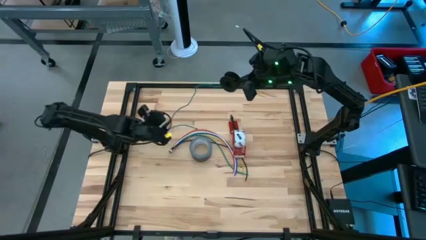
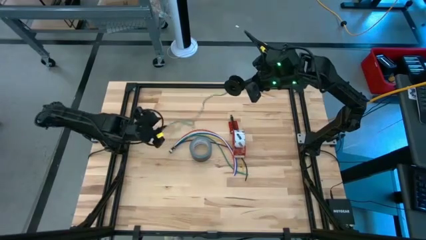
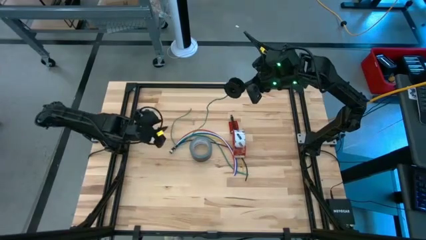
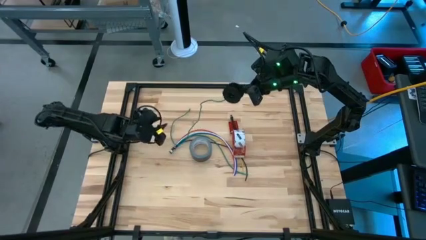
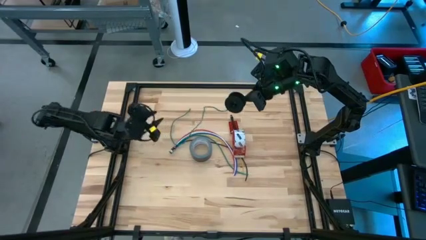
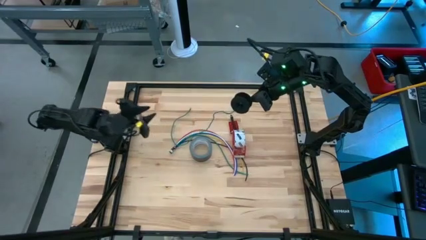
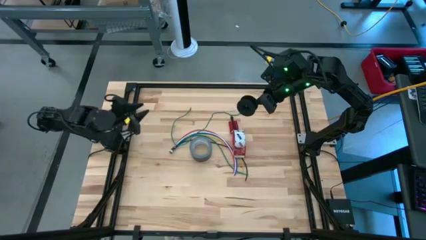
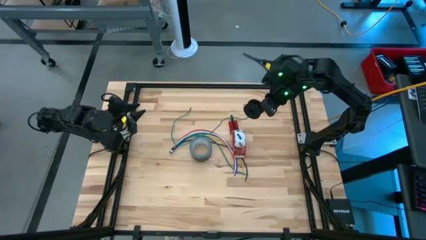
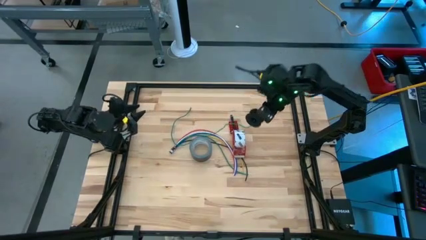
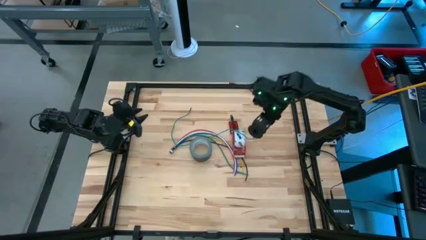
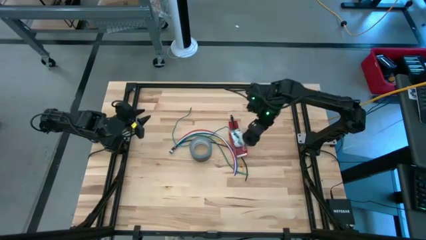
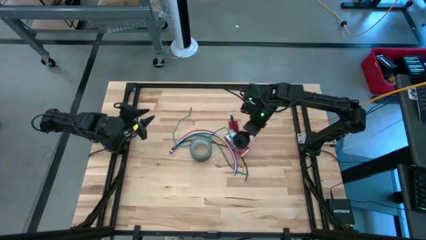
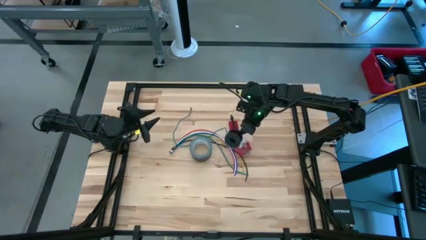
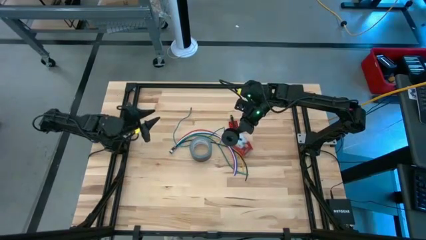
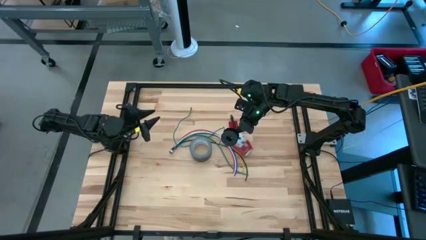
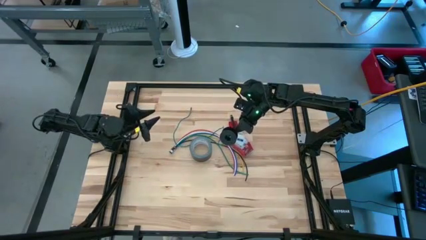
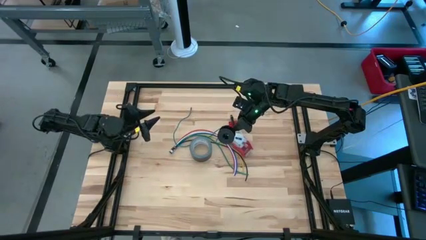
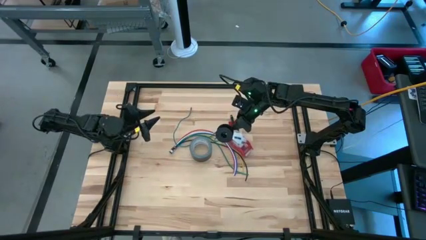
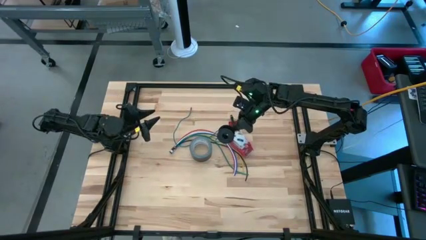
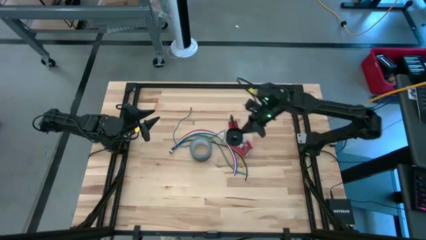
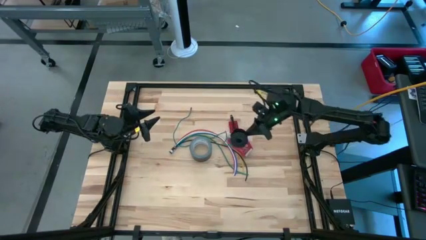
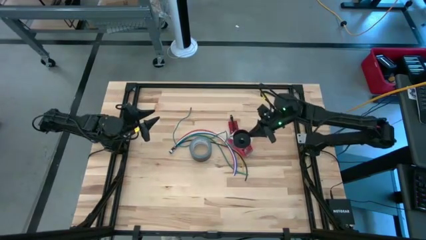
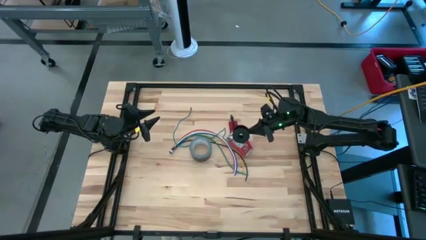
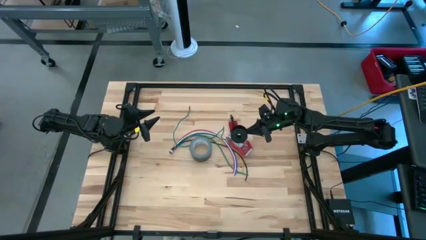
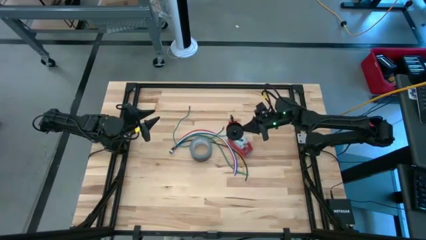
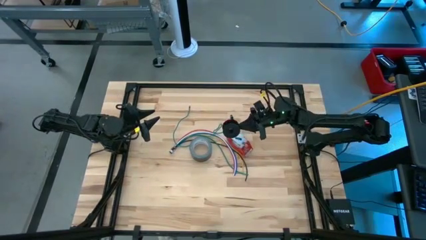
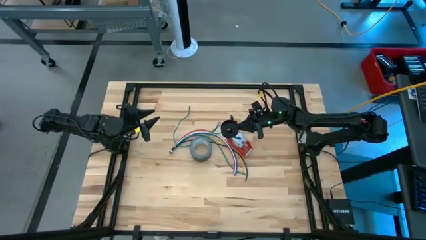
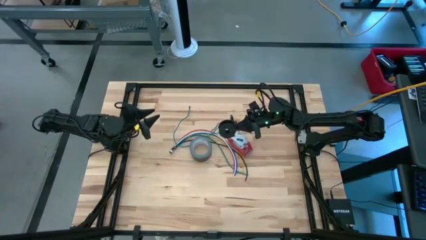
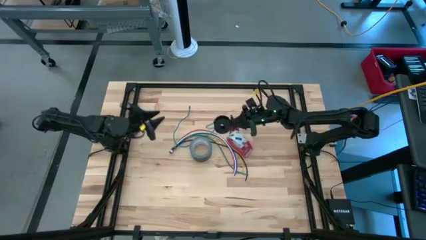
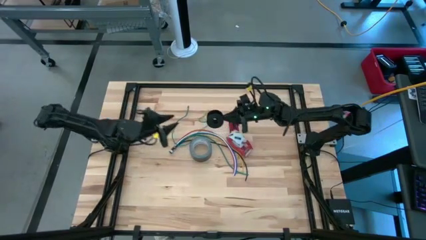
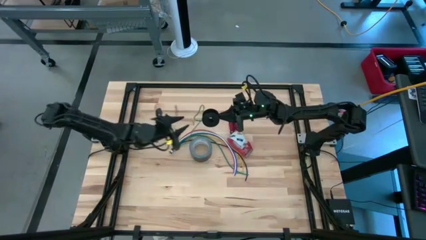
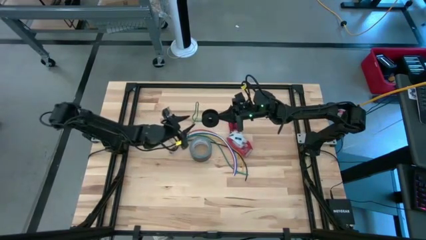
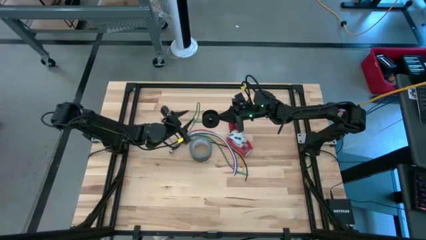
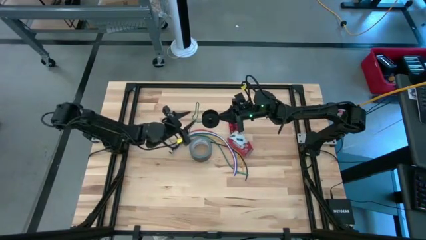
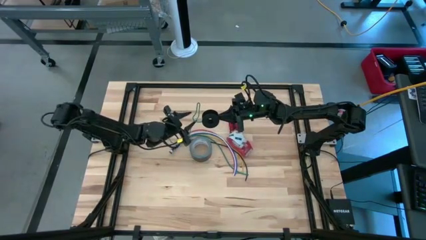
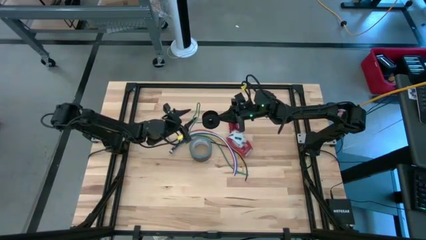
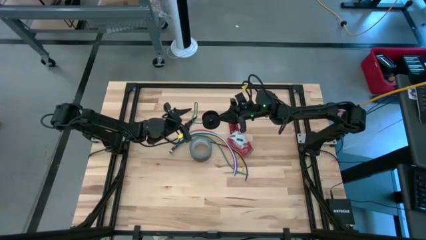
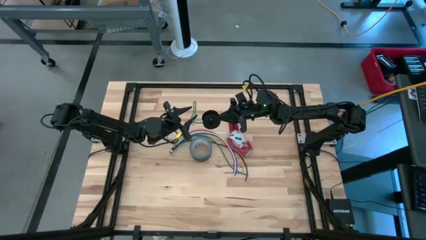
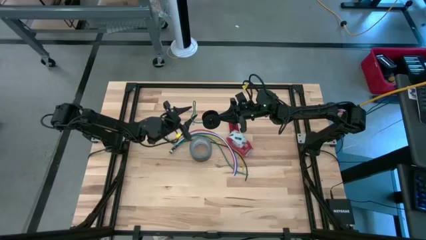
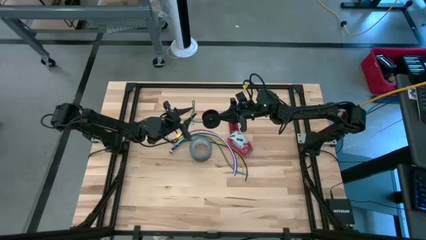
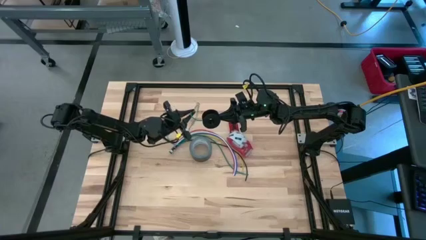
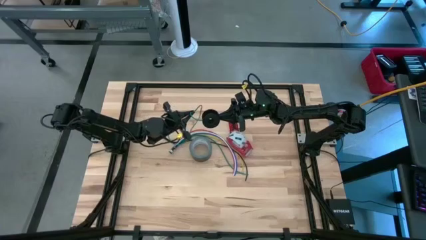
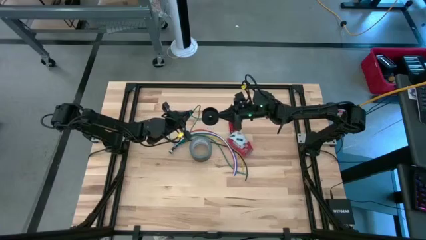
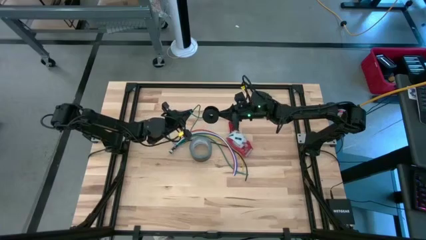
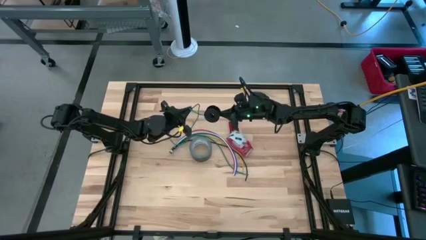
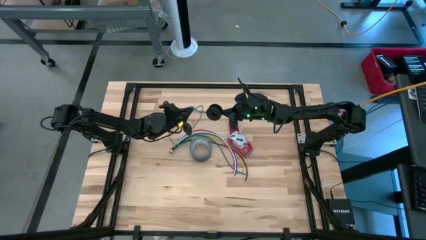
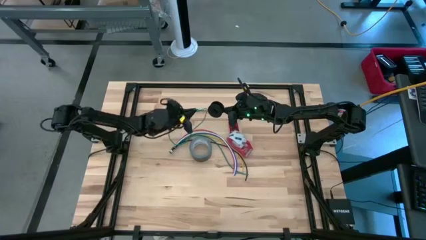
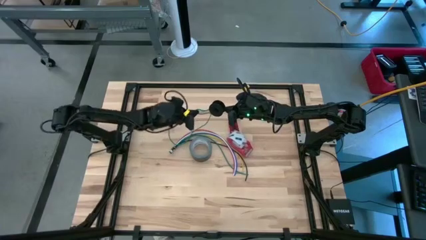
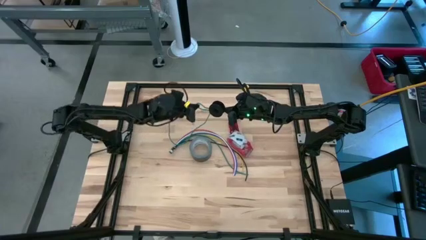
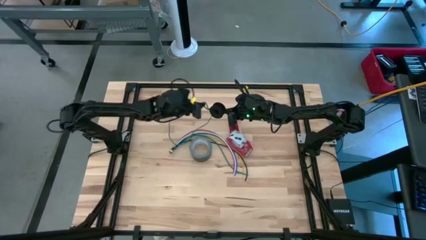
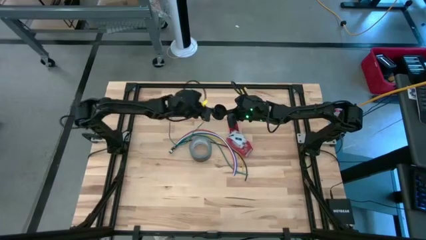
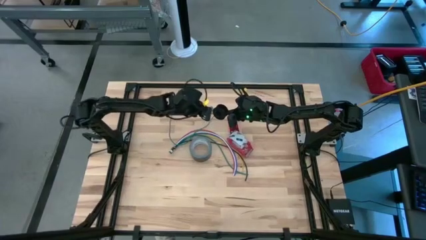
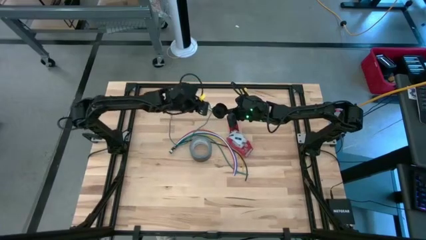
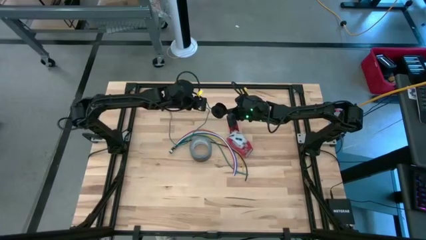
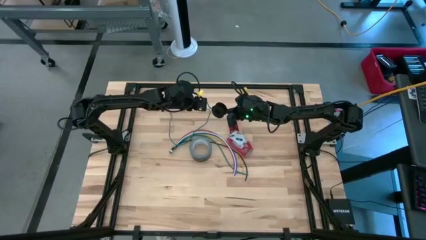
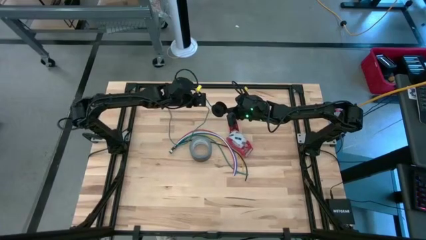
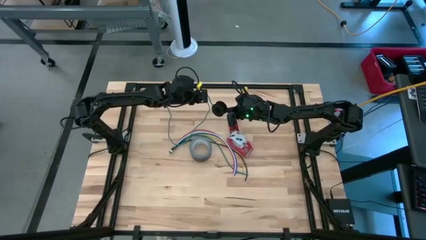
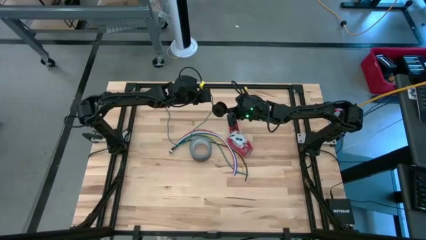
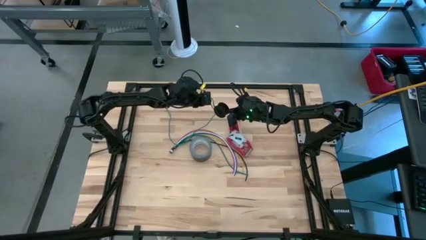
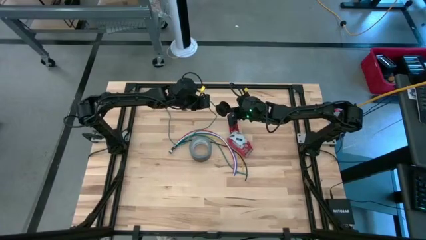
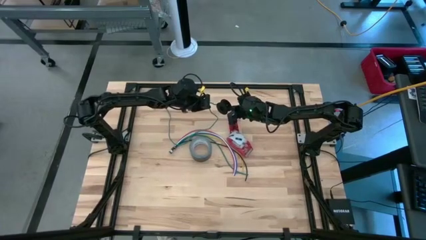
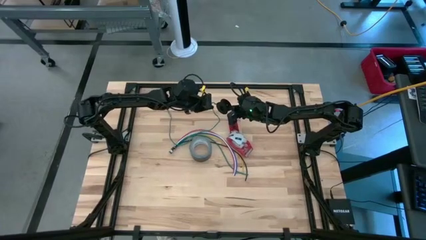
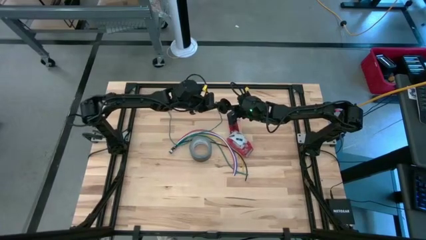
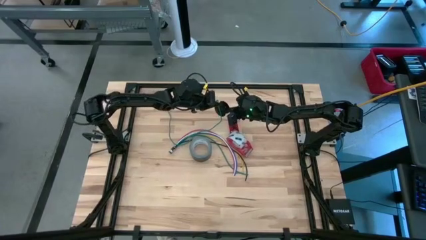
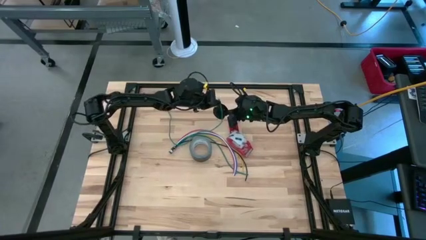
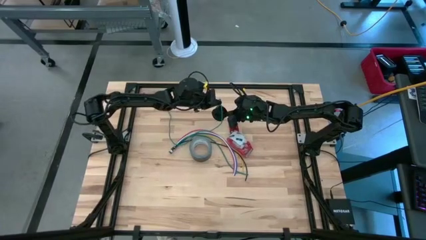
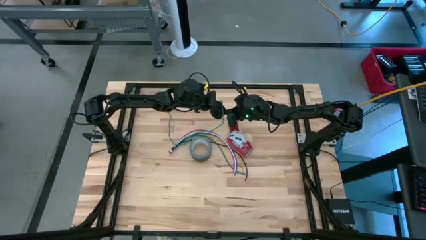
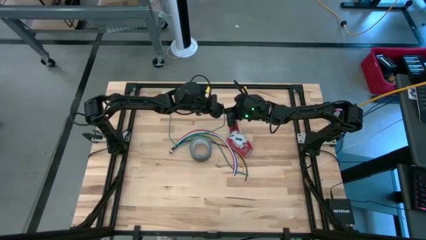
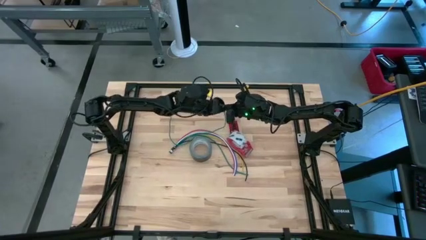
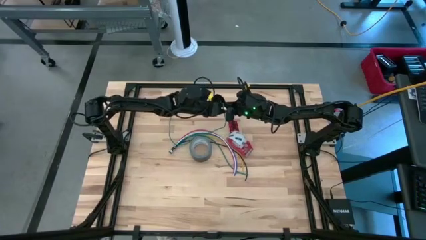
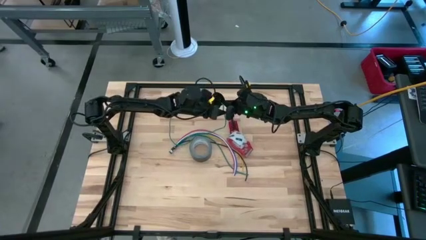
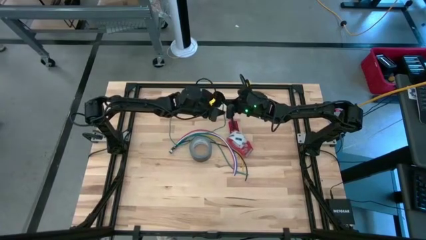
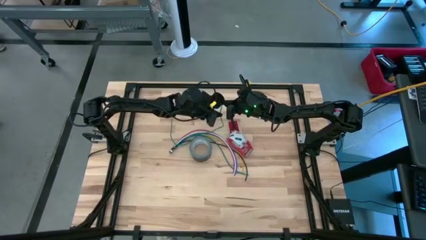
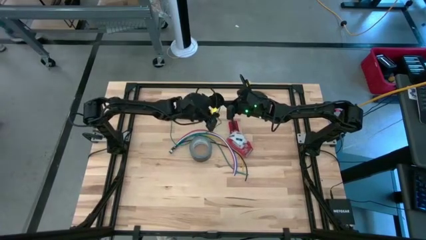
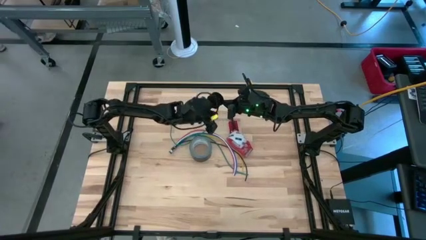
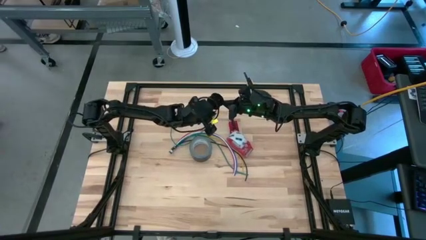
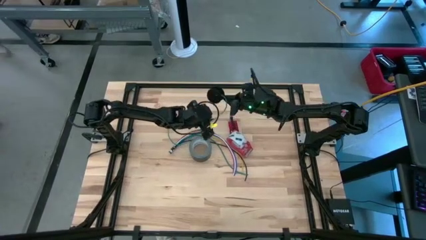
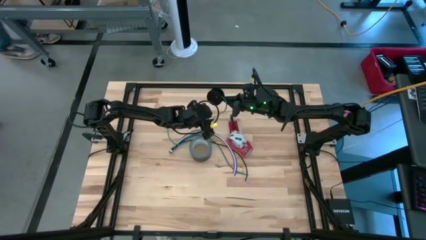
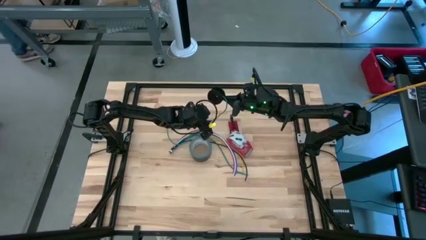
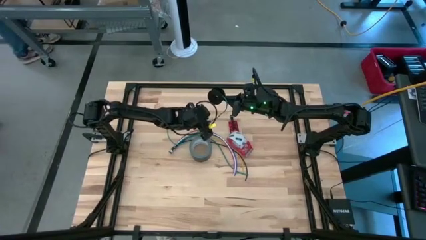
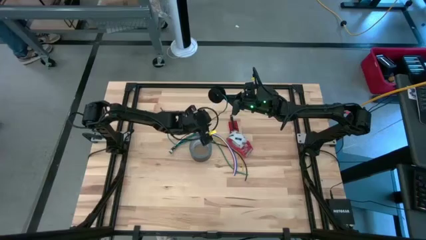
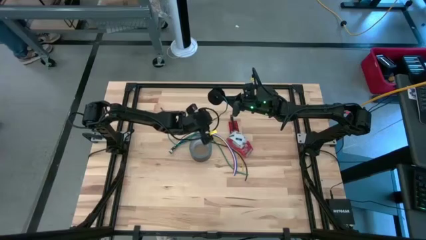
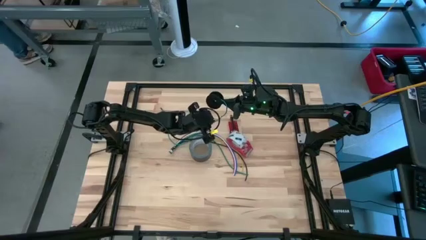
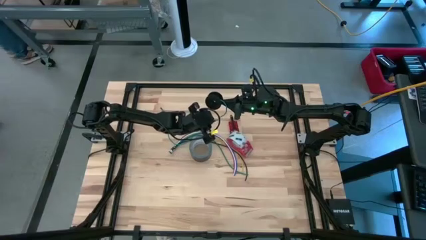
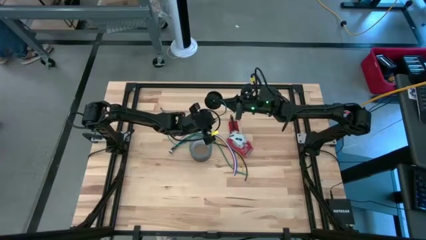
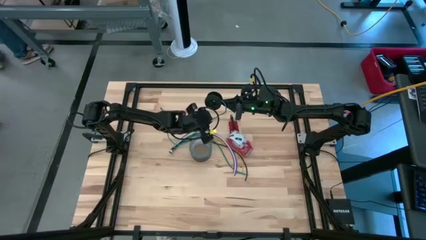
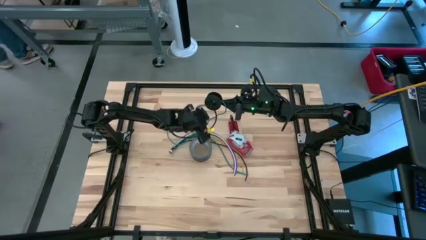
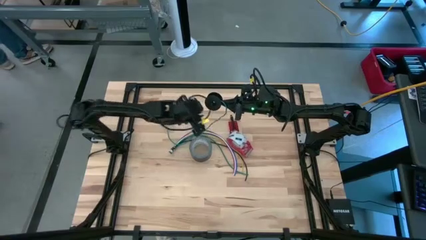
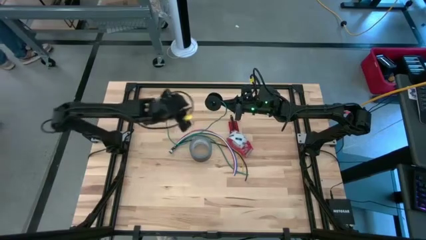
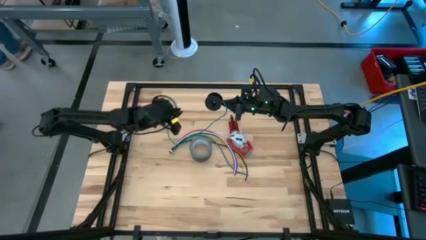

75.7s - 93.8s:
Task: Coil cords
Coil the green wire onto the black spool
